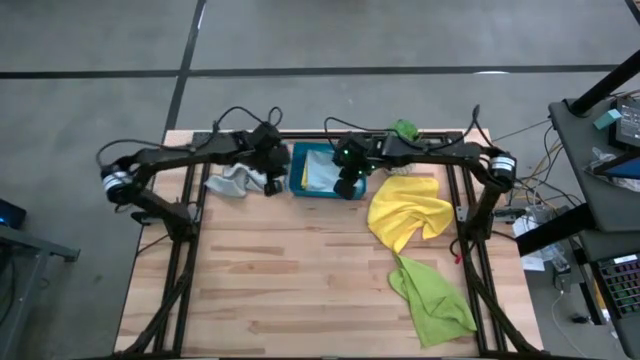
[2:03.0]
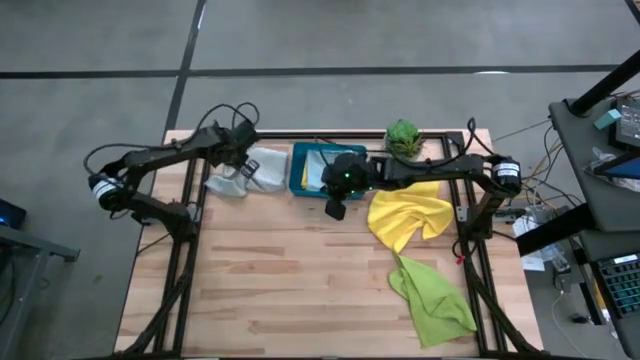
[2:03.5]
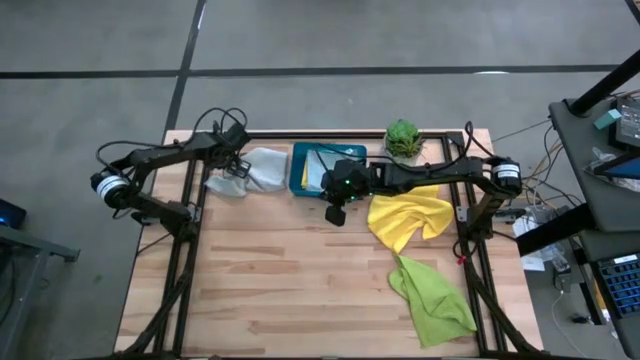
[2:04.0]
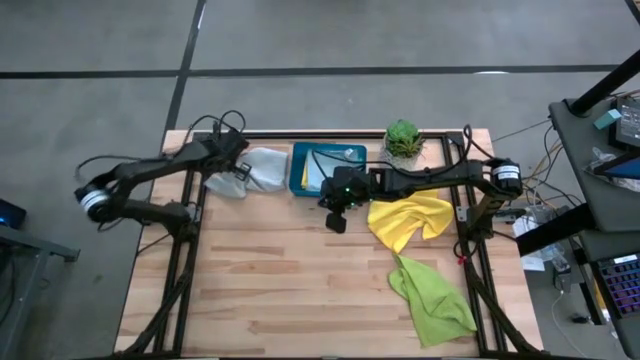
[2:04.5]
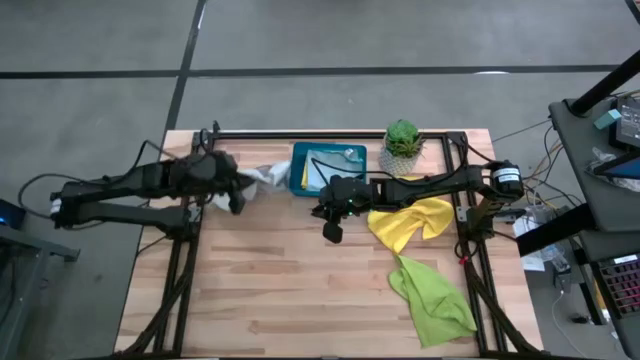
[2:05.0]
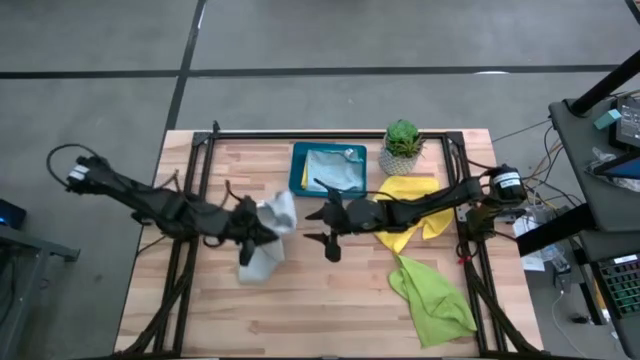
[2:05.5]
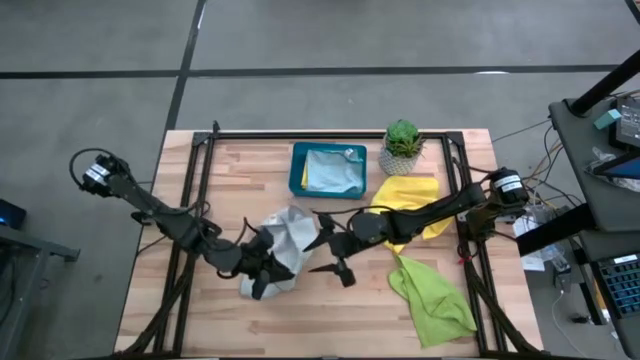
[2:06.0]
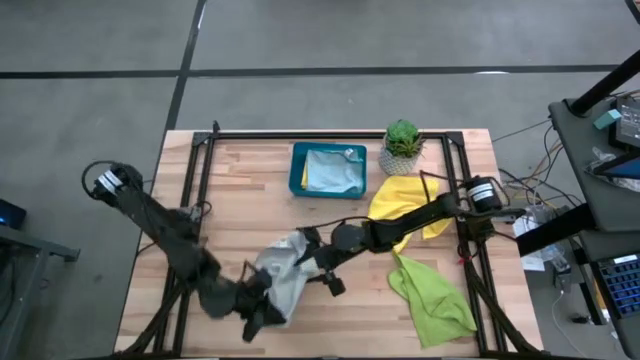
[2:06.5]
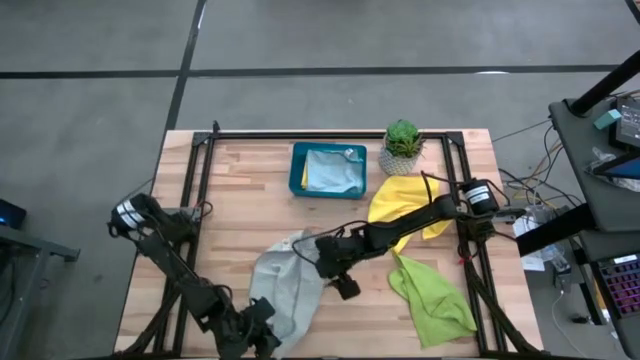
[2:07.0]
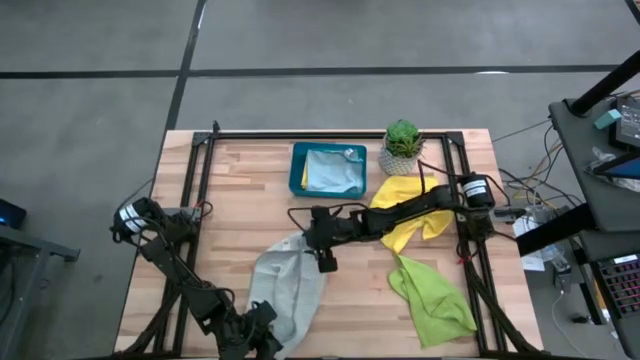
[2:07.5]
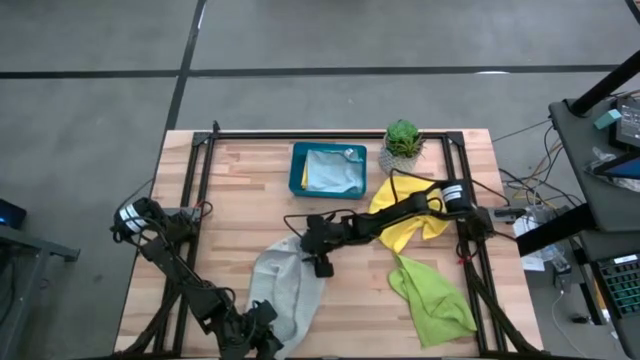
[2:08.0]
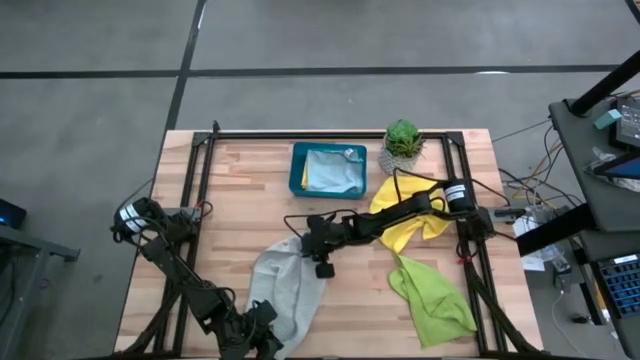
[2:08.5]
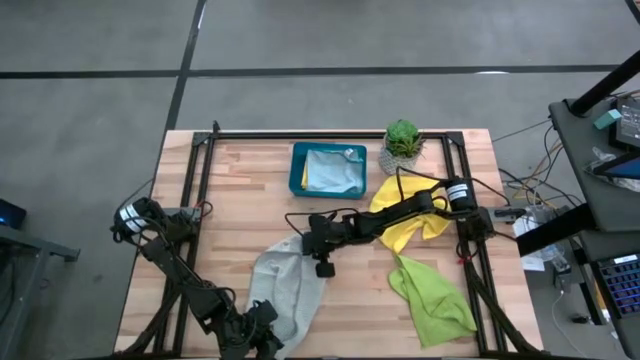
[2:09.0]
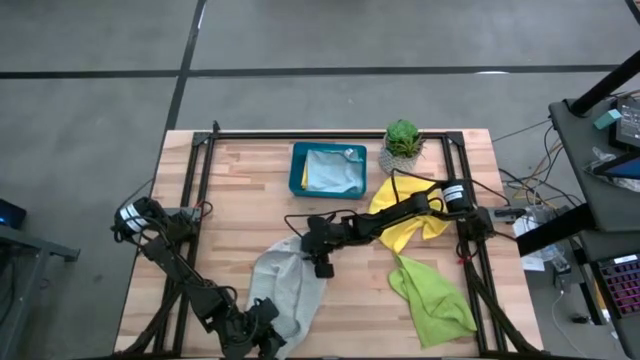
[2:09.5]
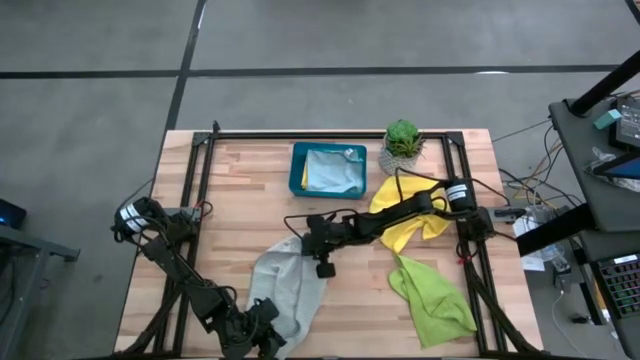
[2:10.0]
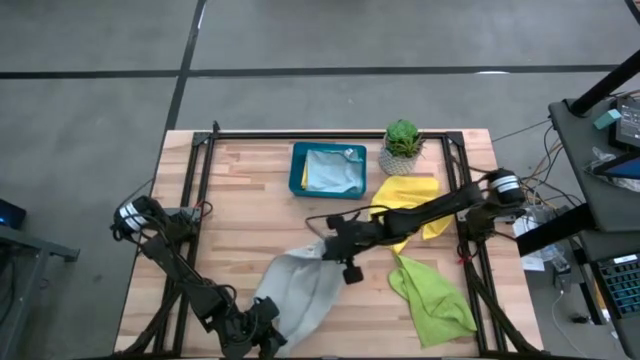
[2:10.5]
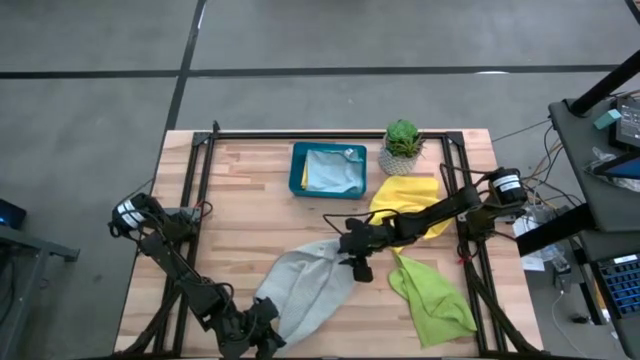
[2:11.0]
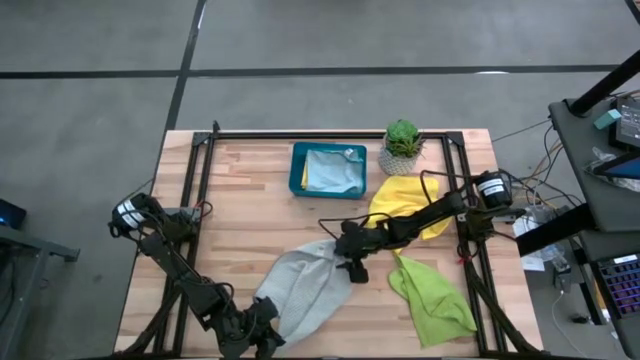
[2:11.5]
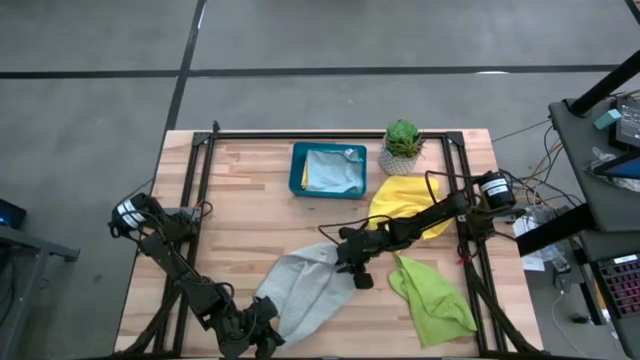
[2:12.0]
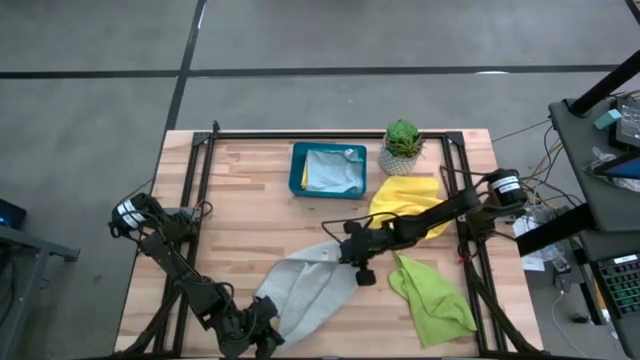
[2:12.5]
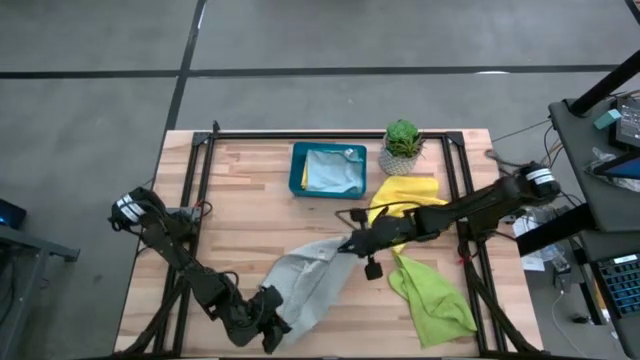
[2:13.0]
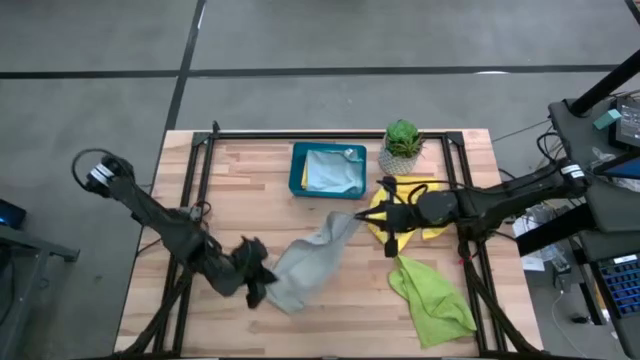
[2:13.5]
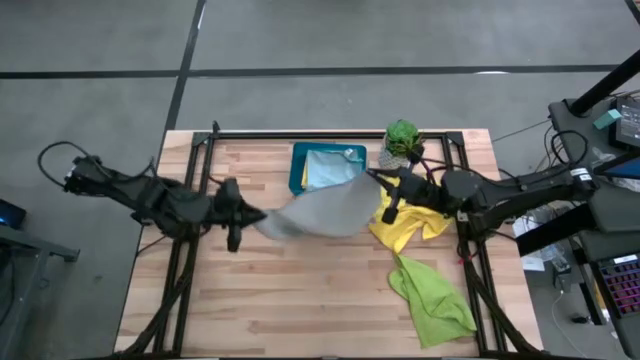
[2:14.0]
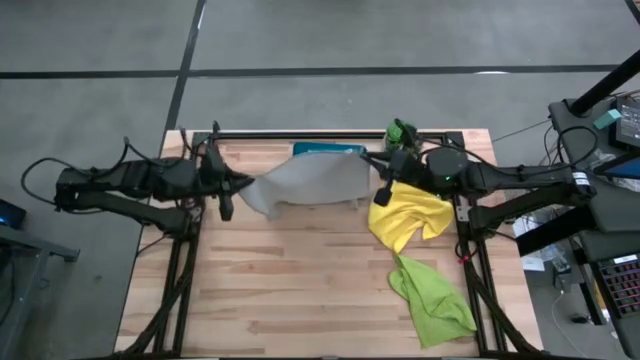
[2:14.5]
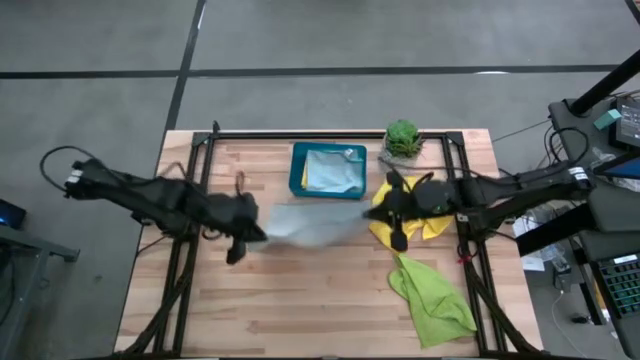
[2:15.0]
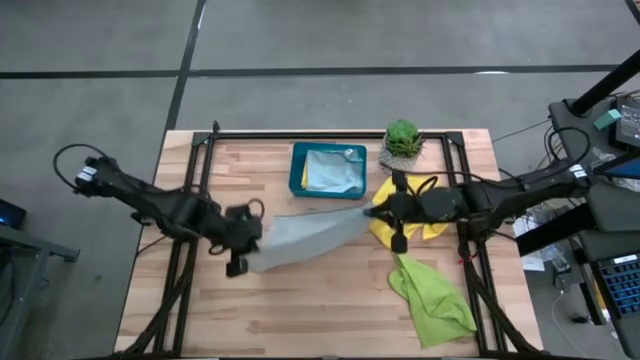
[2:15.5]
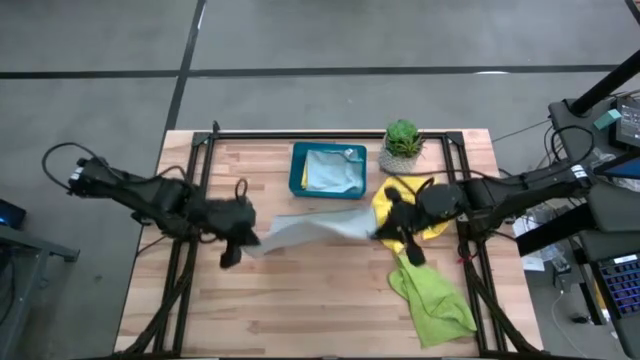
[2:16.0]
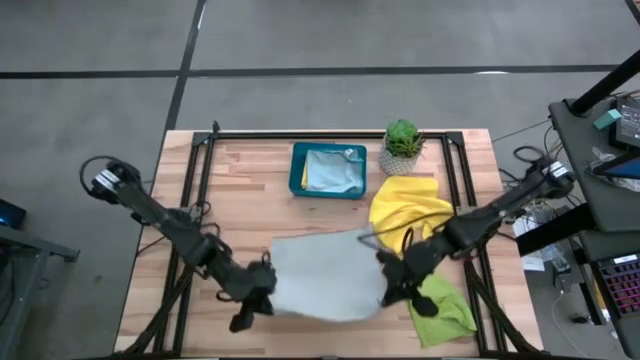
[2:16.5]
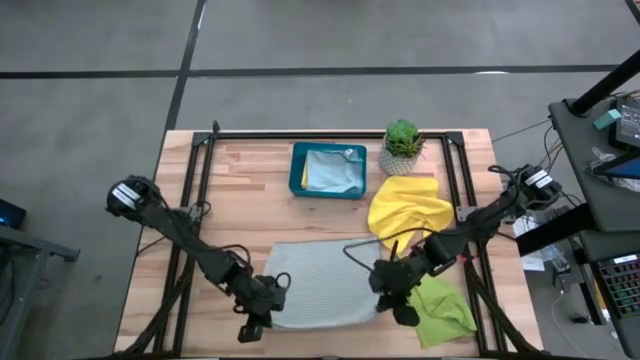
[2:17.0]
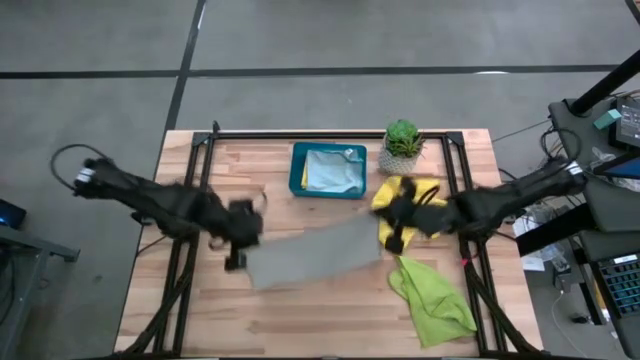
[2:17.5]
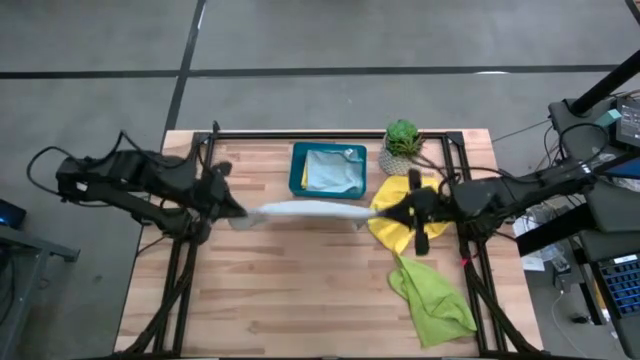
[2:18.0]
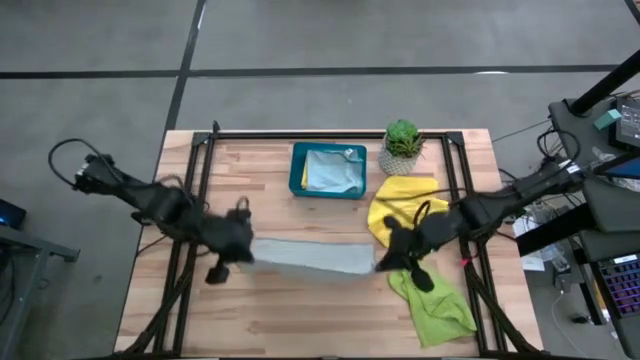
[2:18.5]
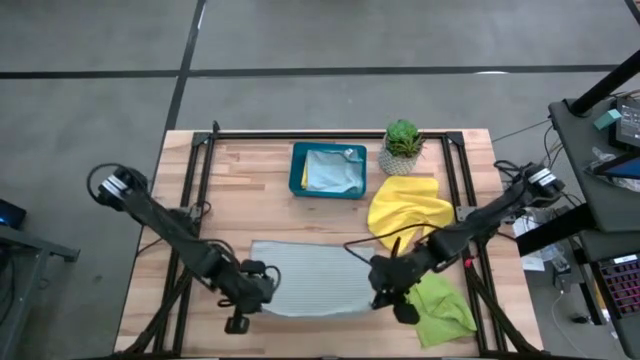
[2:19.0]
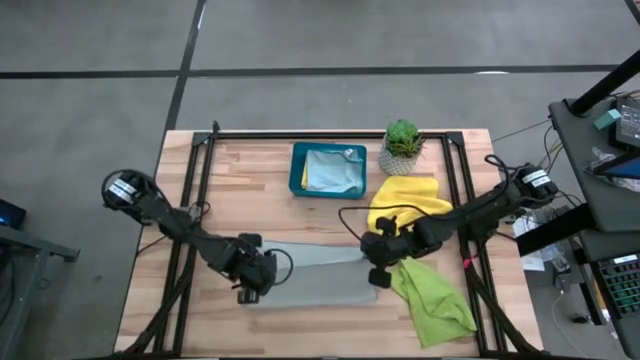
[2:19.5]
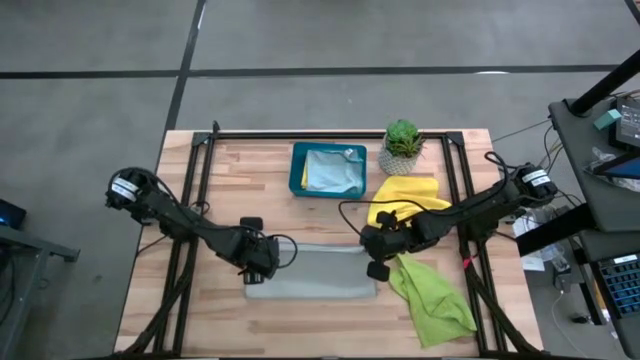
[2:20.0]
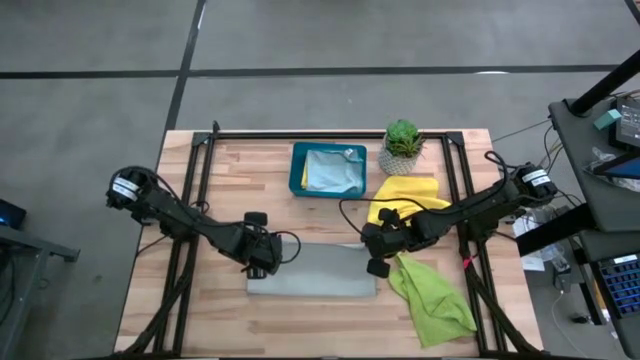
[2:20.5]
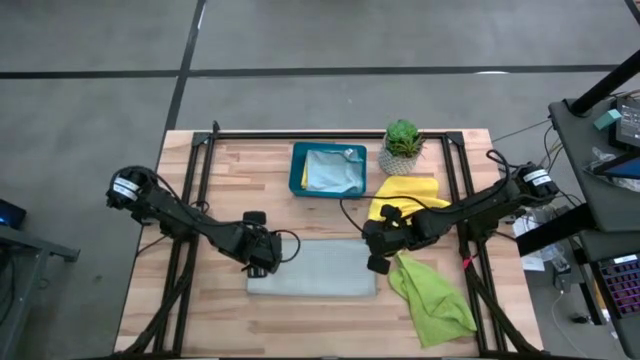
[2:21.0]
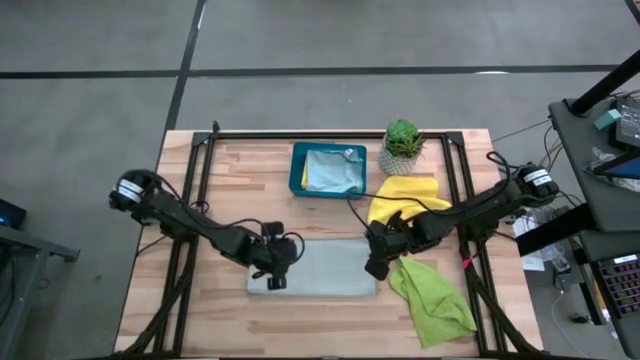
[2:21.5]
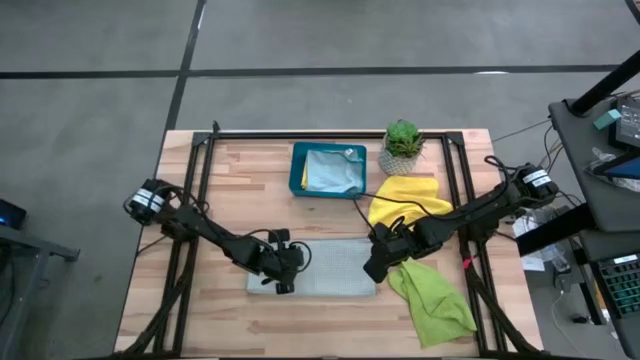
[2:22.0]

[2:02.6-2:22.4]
Task: Fold microfiber towels
Fold the grey microfiber cloth
